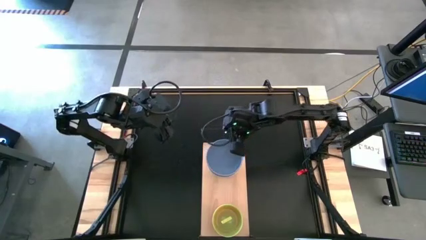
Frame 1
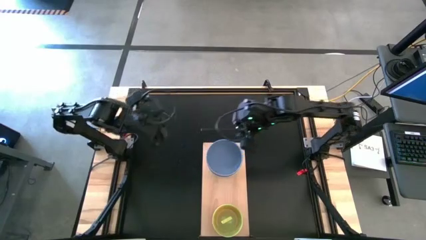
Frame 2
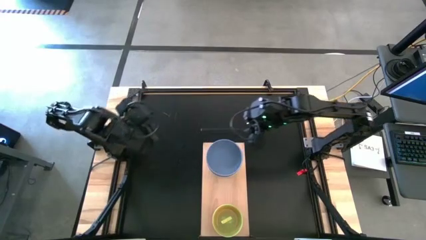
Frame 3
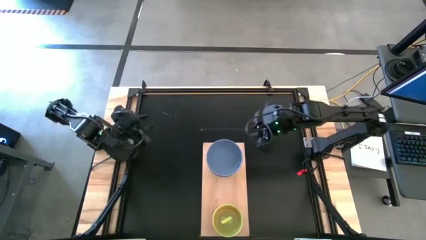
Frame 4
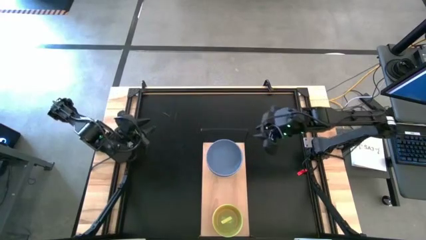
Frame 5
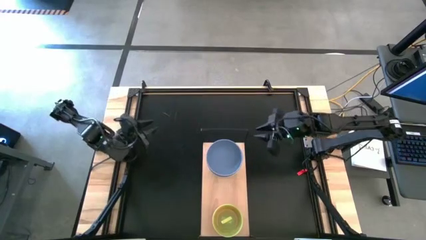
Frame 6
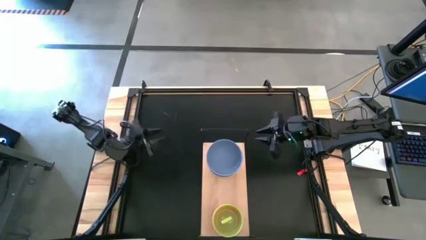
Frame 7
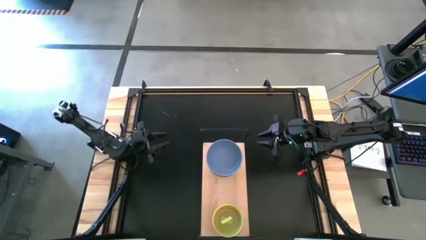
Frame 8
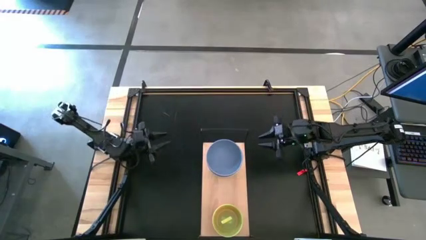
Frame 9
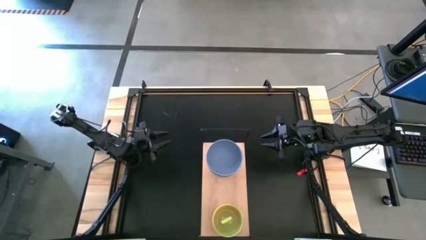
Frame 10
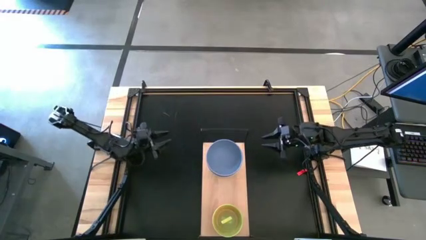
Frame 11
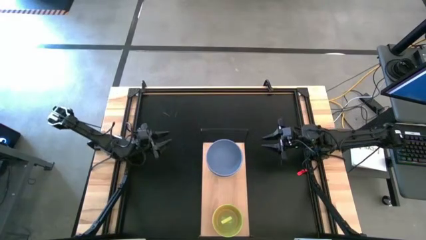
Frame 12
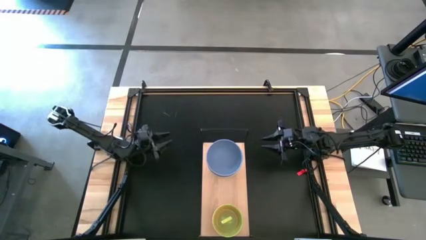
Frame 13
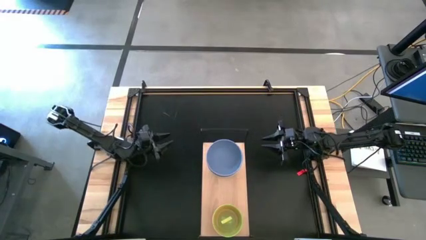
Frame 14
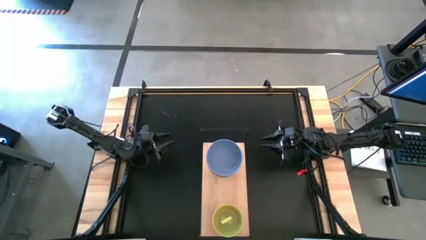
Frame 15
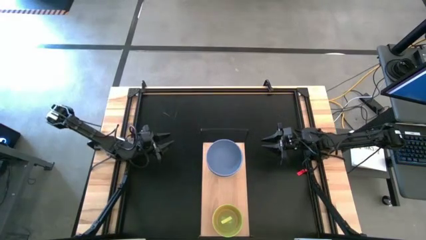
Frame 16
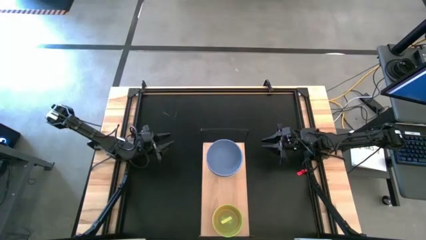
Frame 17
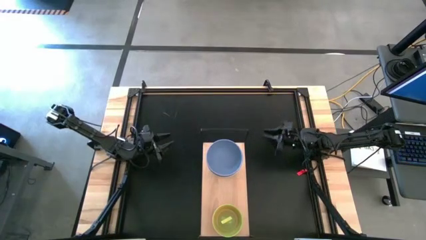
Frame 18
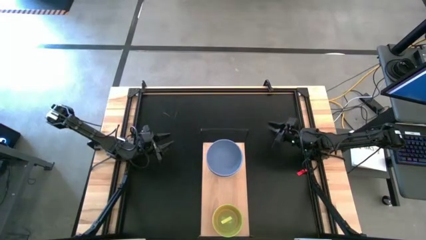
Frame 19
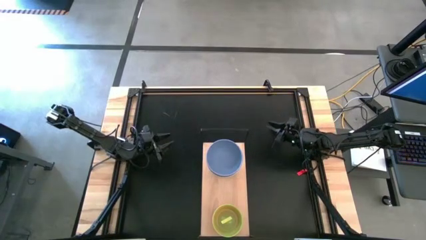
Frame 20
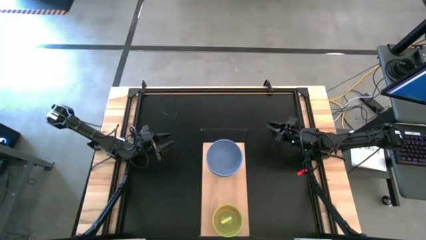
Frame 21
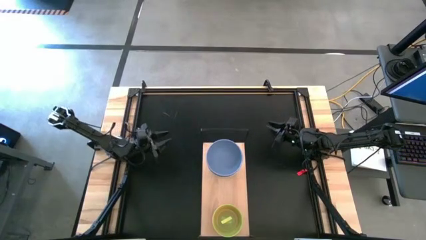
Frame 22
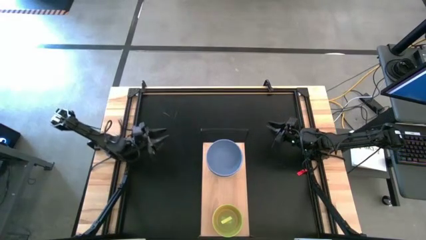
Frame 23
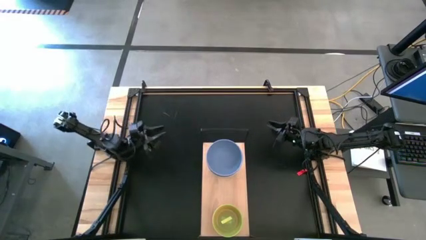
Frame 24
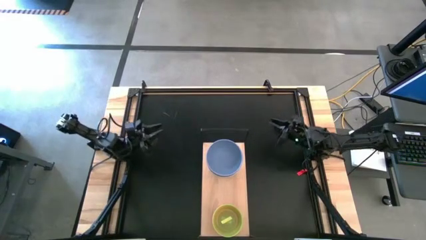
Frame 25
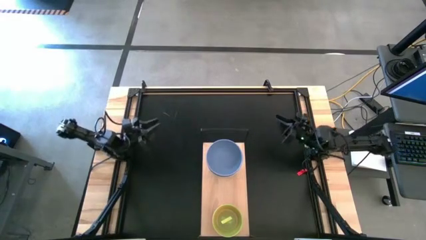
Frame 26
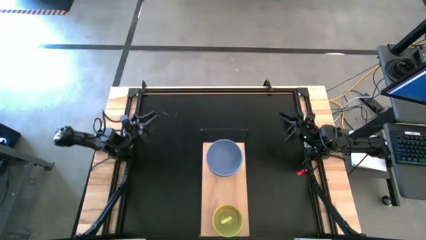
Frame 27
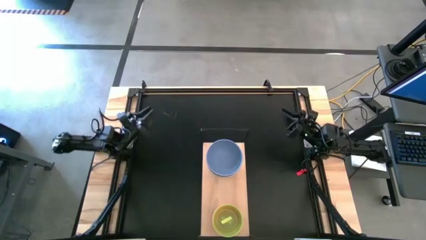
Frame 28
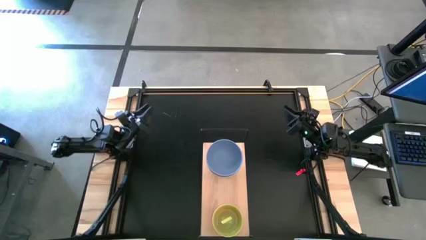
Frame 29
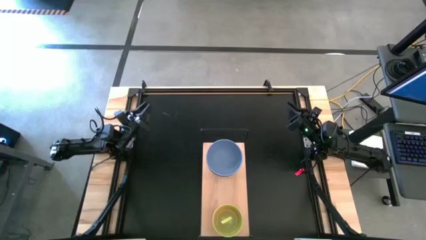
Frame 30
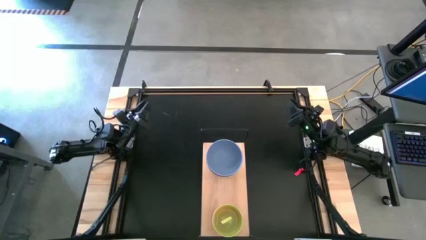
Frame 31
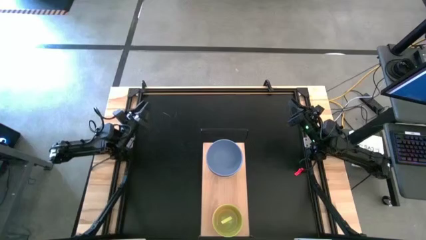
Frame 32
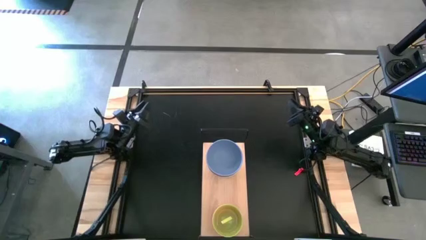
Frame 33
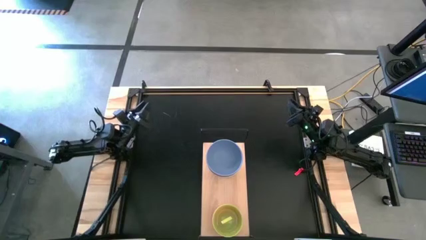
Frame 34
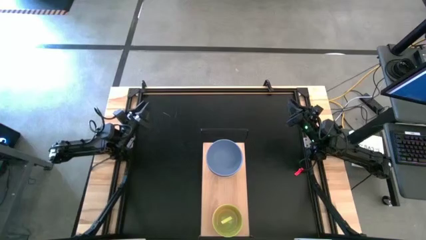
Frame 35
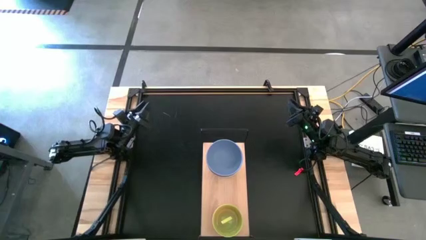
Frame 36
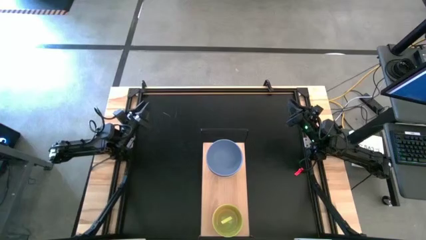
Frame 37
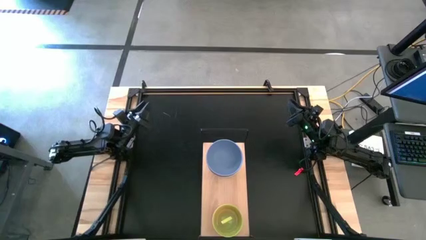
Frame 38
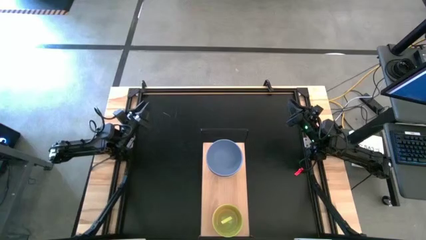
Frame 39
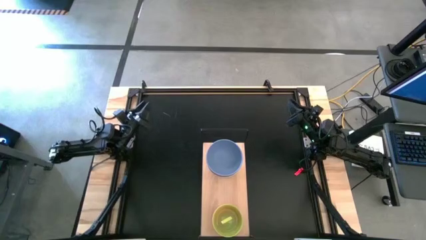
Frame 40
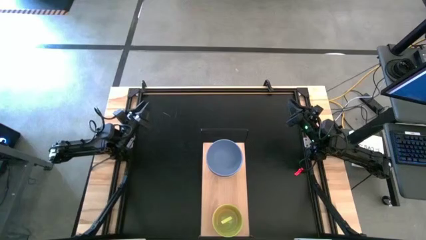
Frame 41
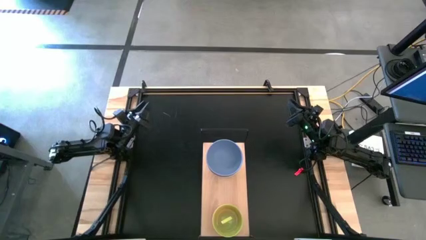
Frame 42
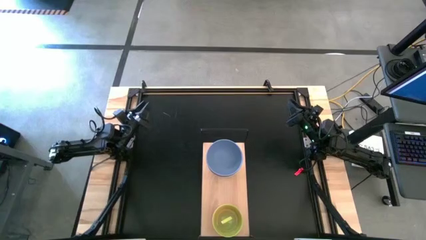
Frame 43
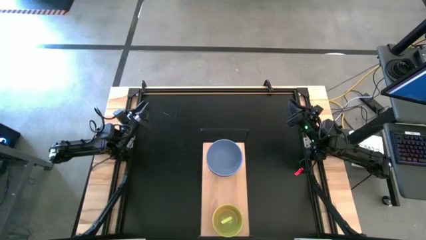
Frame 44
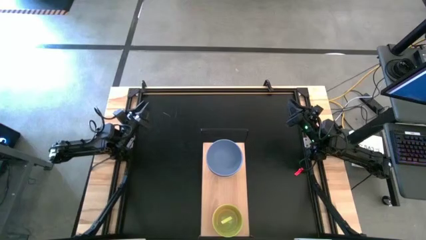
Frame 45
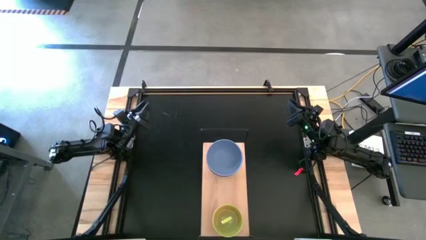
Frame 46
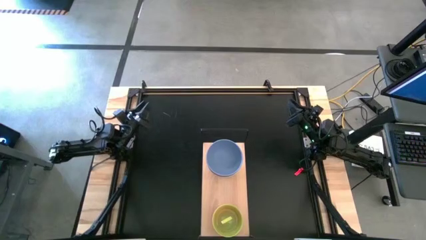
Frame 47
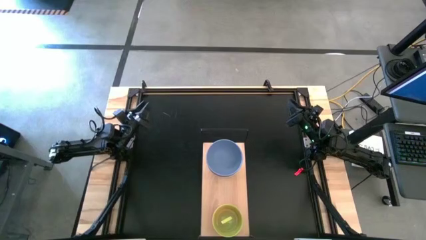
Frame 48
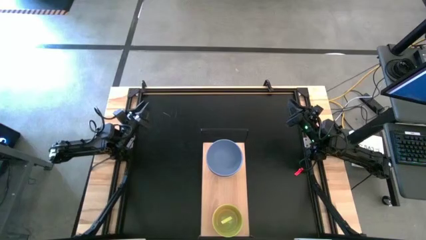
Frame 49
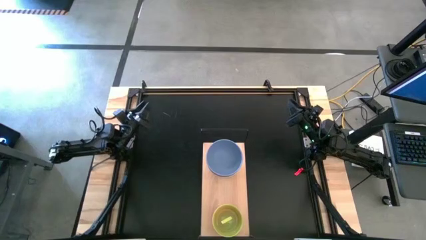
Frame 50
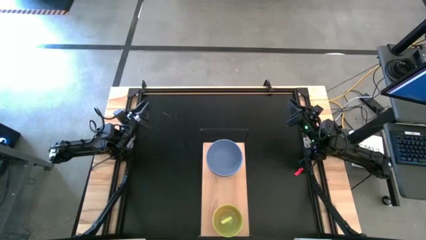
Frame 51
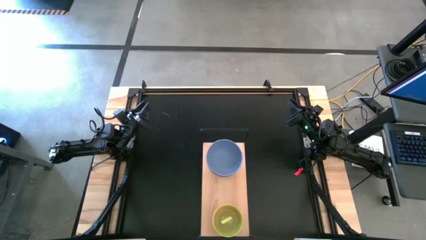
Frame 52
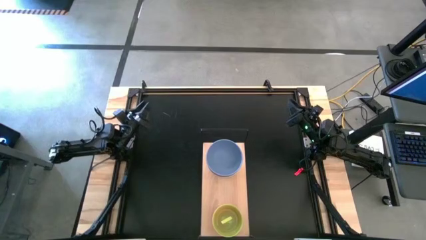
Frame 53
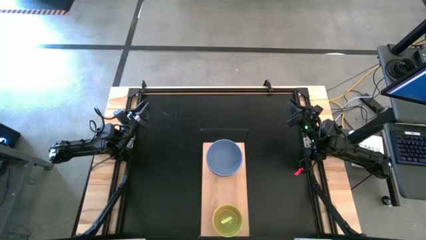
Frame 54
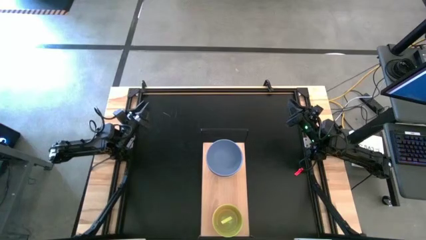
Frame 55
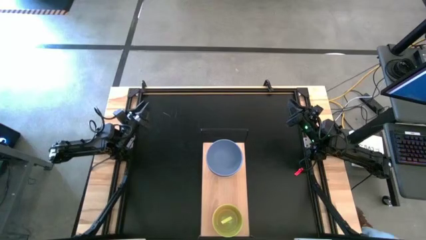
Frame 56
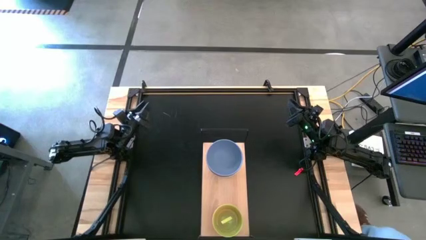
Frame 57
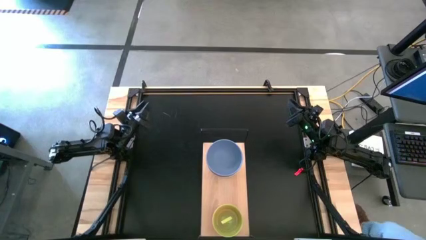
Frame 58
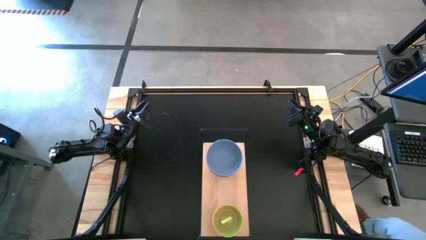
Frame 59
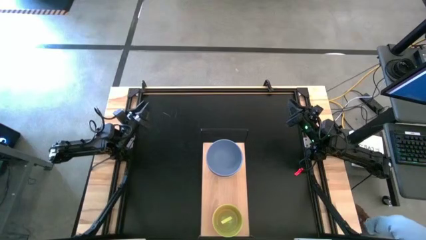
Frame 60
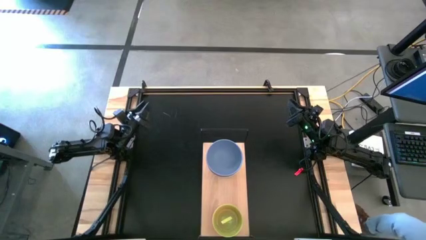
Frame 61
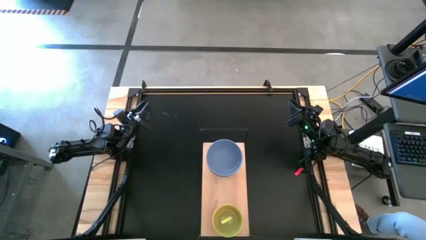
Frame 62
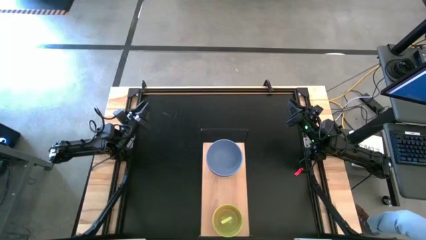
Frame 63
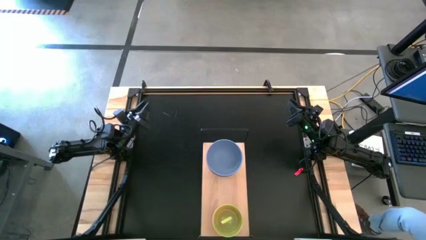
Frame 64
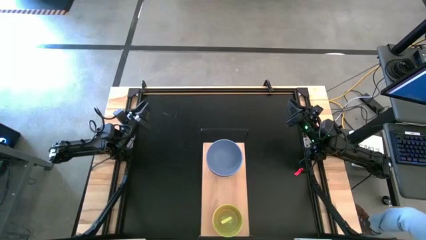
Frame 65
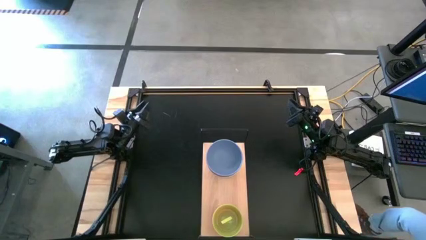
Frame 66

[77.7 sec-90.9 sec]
Task: Place and stack bowls onto a shelf
Return to Home Position

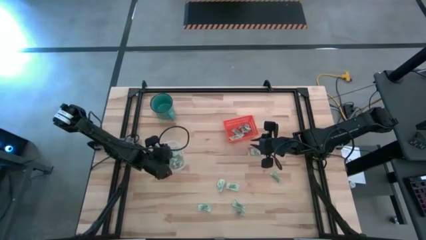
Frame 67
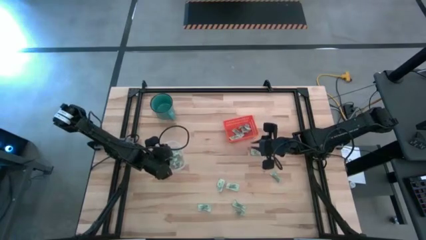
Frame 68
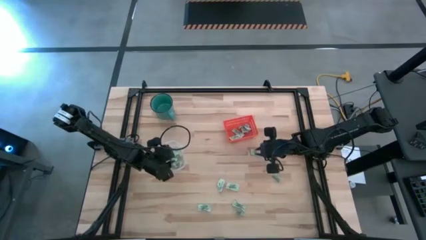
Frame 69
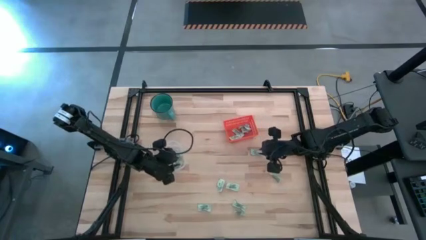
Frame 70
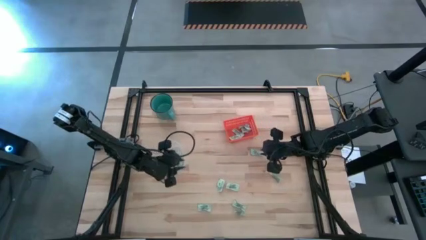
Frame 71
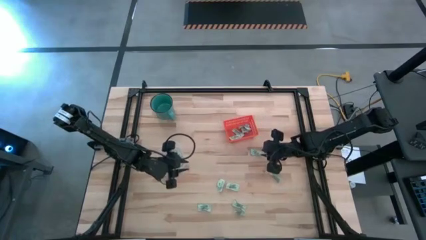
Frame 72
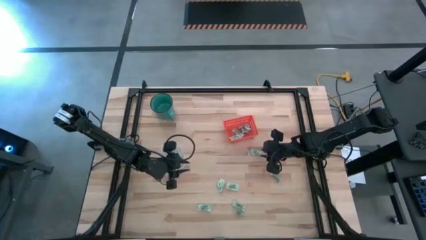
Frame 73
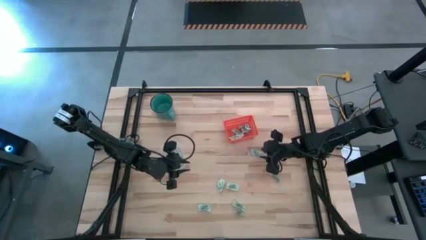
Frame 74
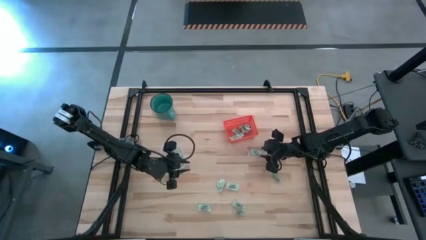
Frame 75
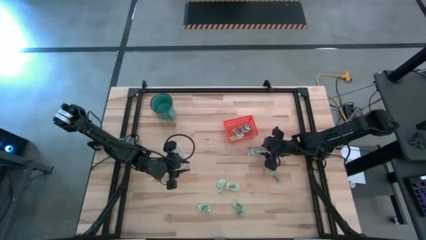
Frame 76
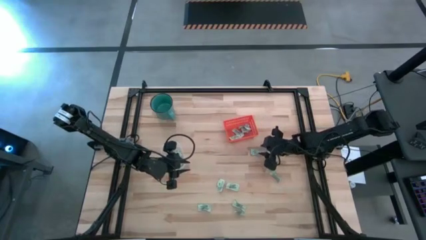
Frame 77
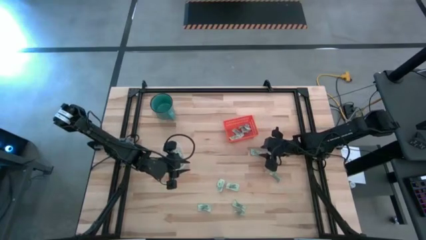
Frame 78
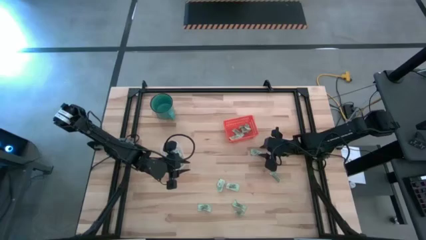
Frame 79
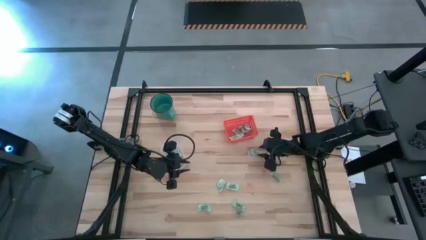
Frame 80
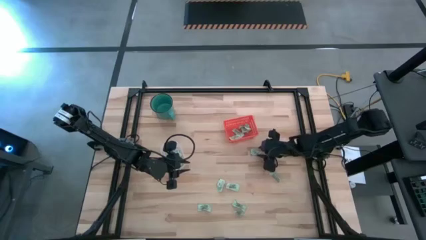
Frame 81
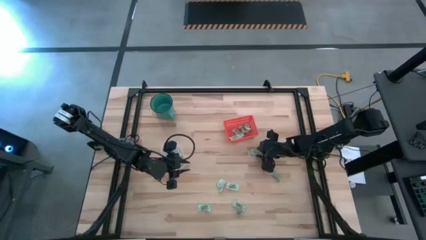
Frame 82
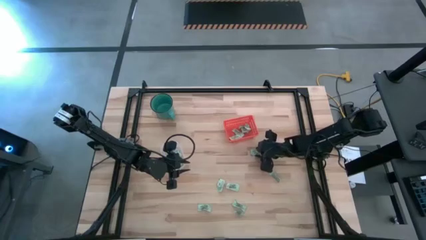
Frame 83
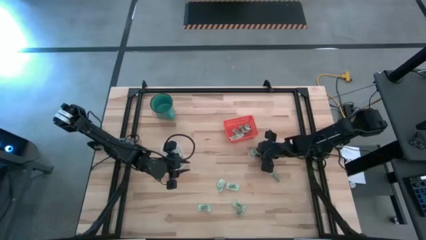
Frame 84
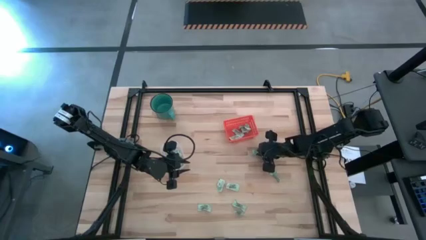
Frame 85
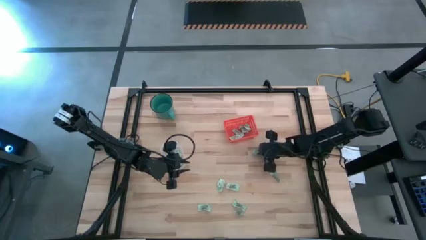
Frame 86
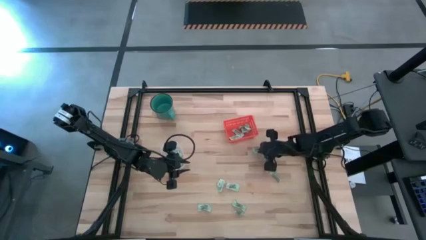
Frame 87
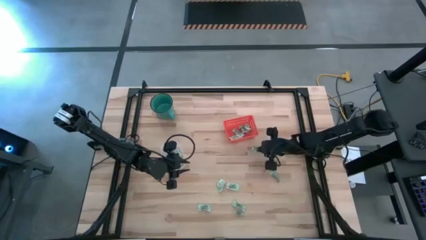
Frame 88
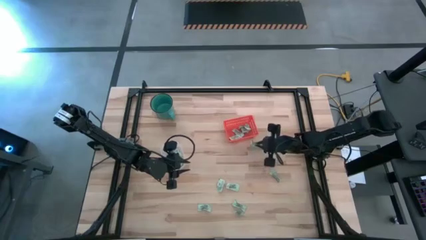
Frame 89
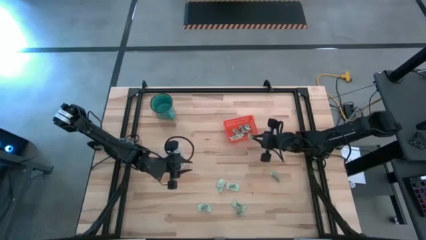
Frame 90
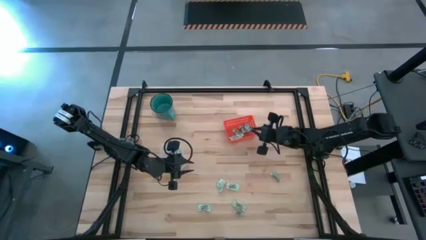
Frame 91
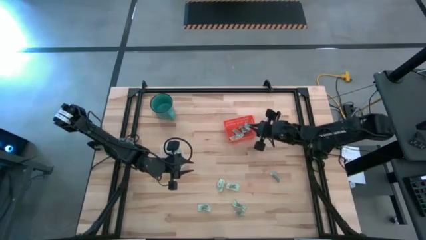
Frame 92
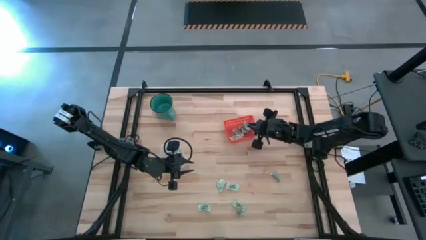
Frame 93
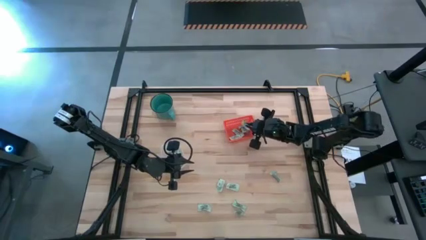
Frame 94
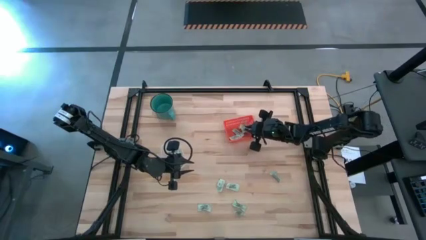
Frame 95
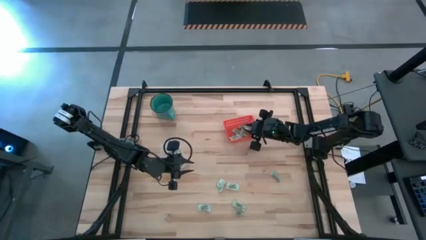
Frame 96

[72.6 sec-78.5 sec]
Task: Pick and place items into bin
Put the light green stevia packet into the orange bin
